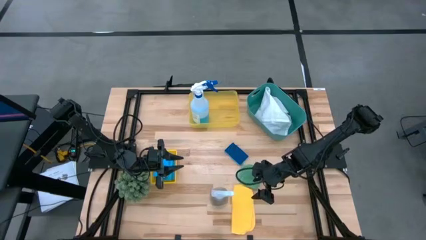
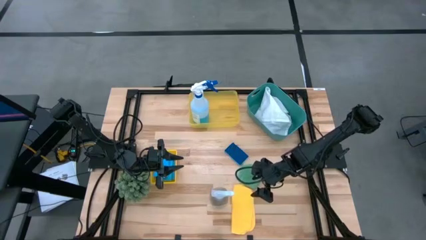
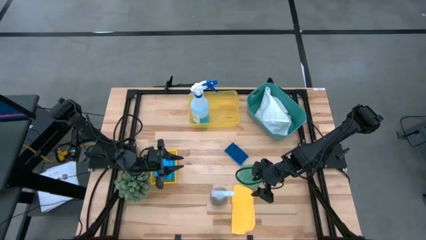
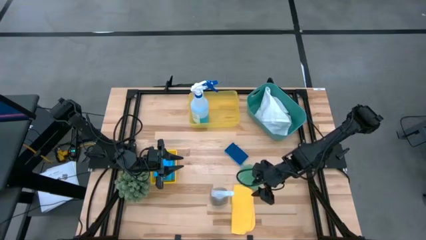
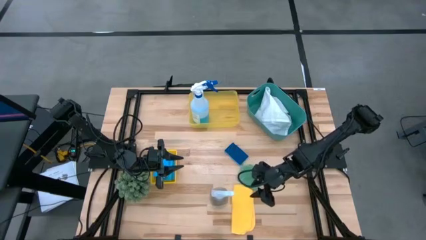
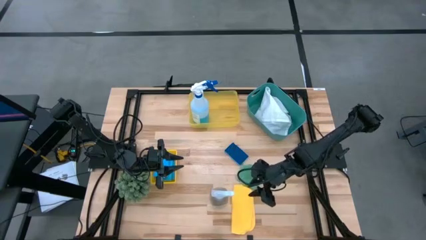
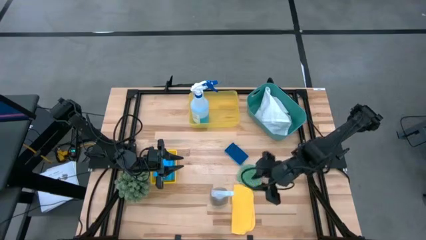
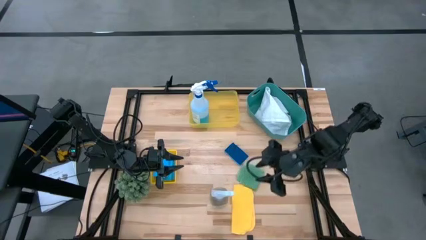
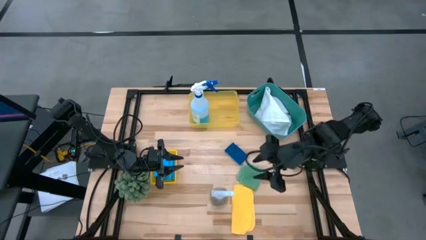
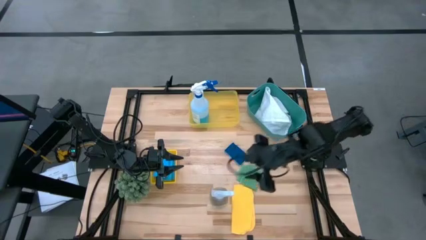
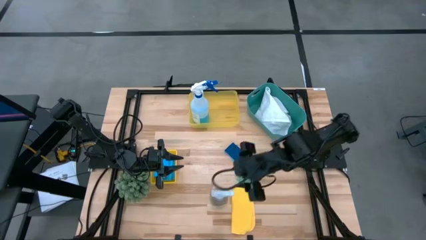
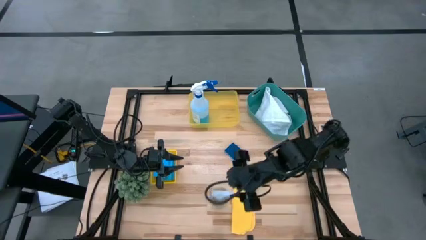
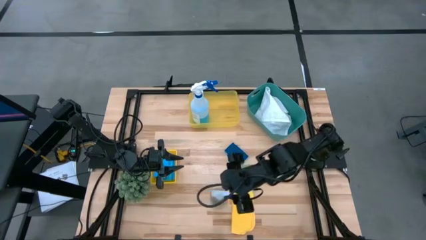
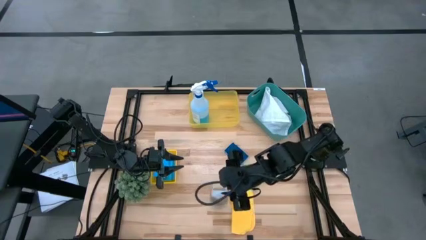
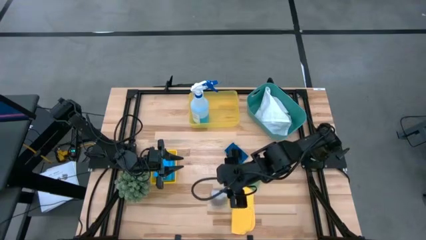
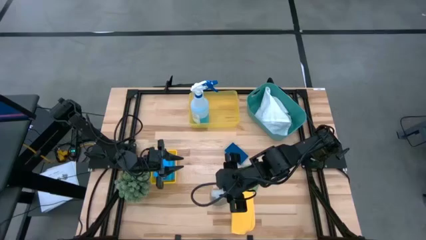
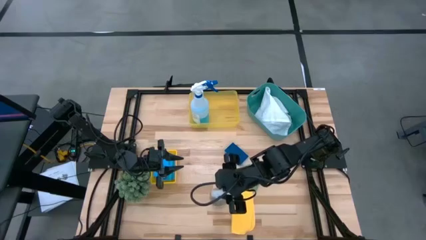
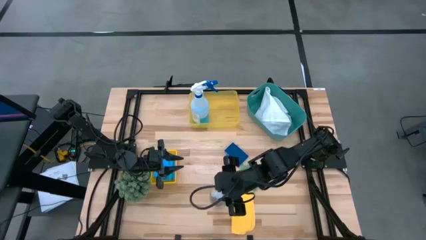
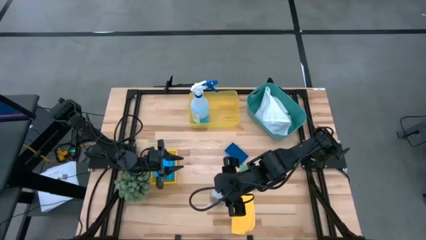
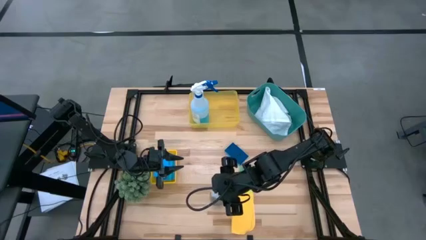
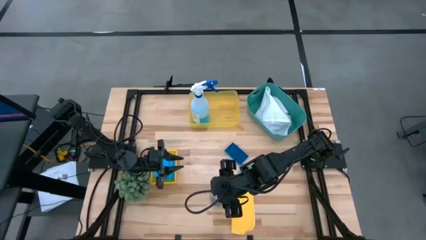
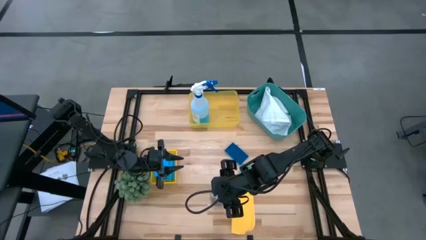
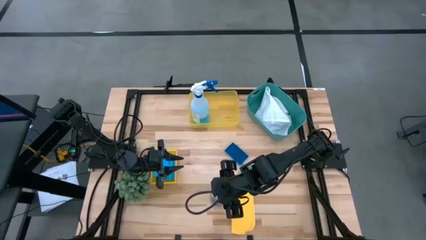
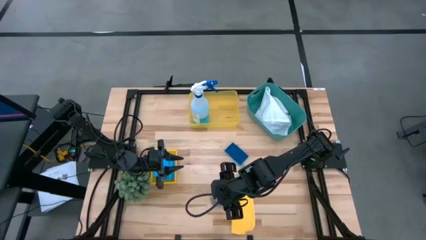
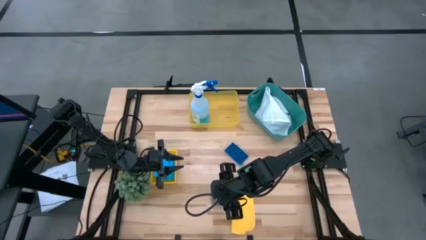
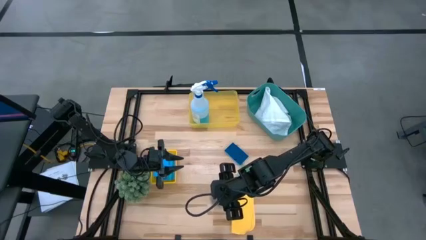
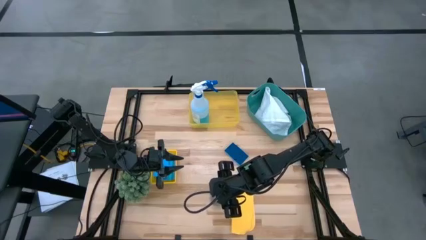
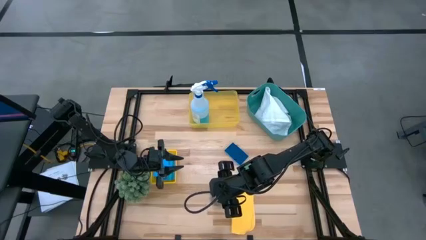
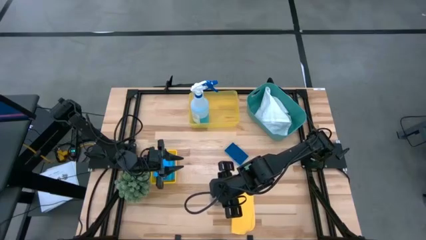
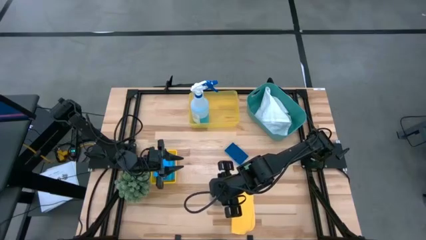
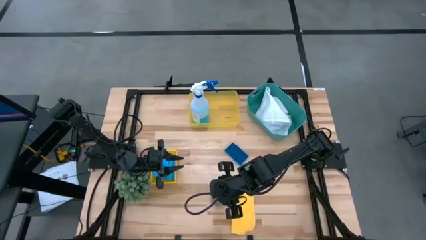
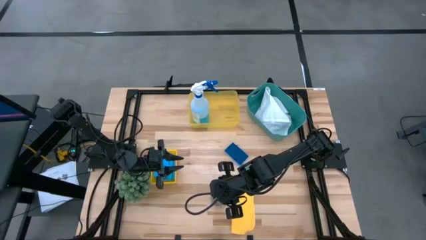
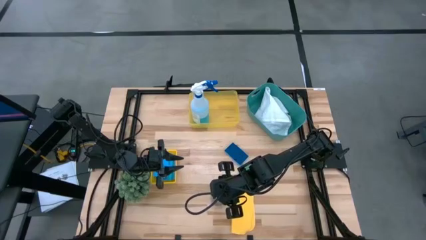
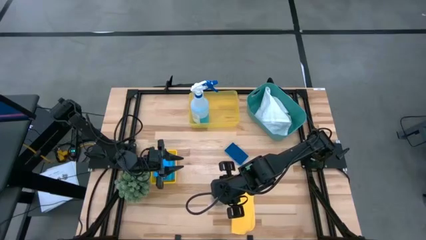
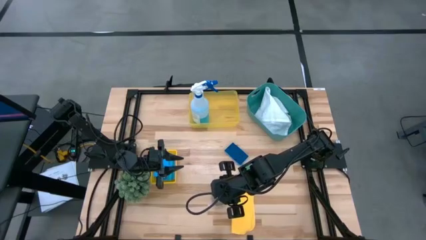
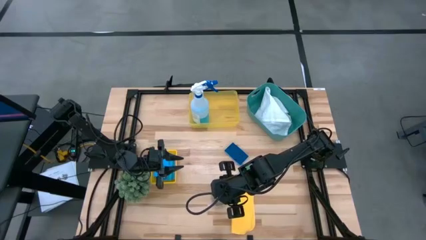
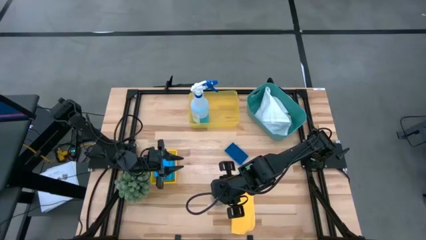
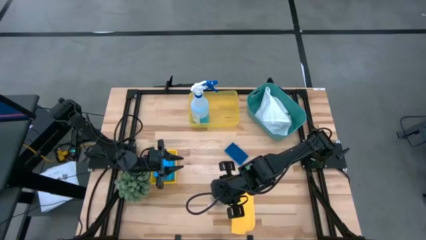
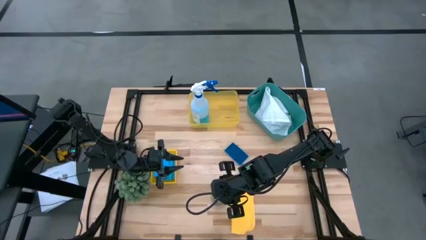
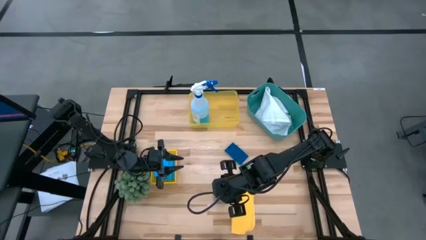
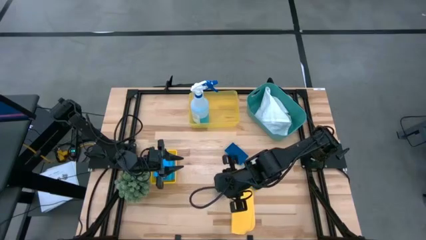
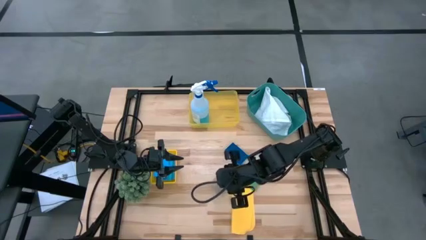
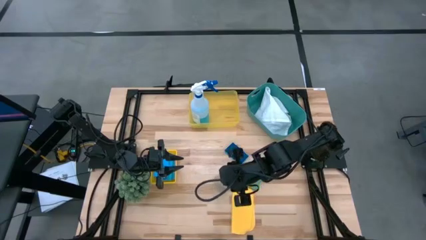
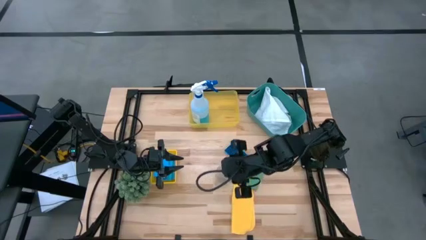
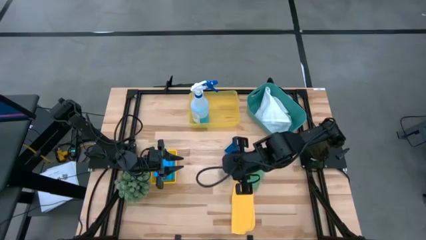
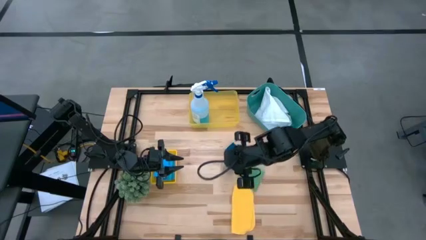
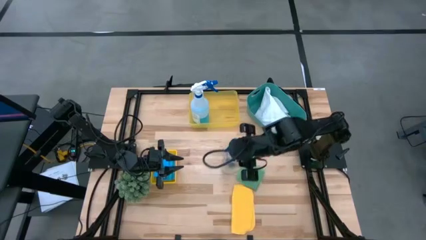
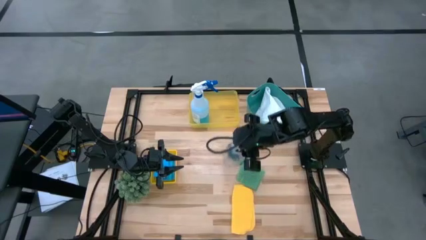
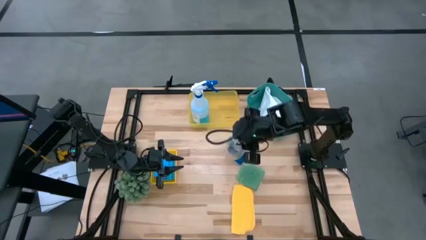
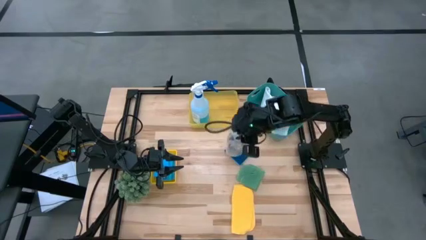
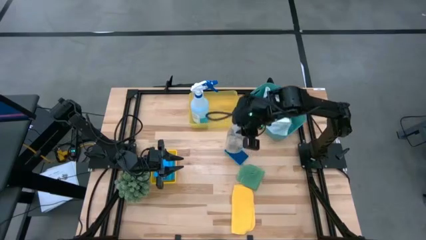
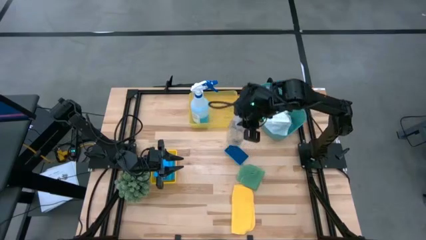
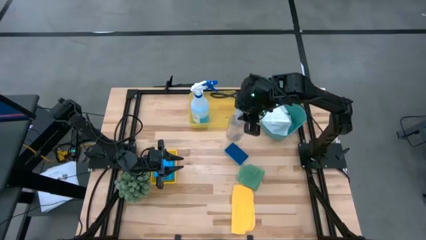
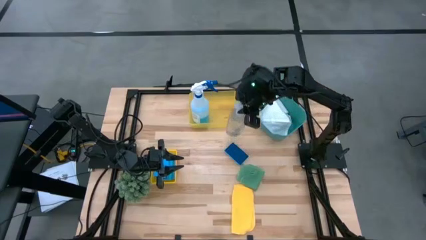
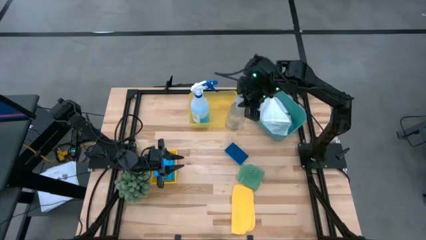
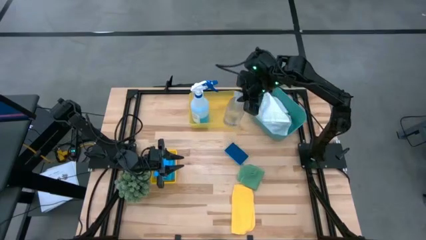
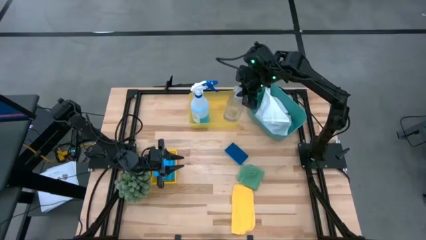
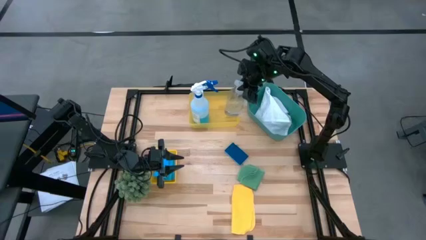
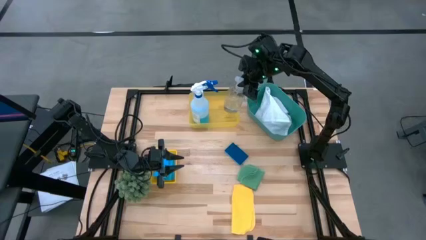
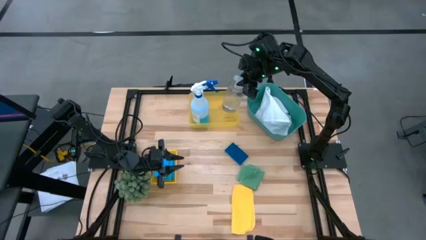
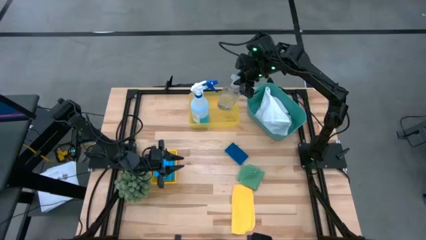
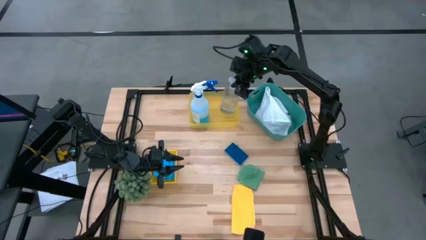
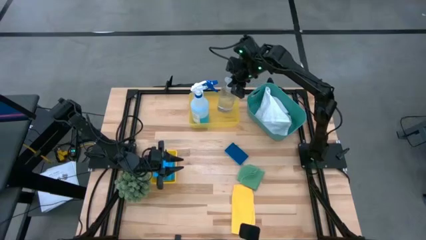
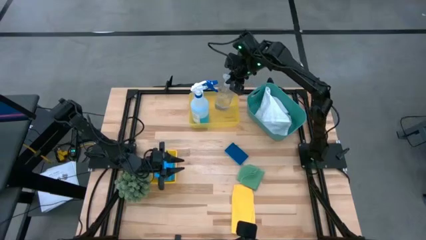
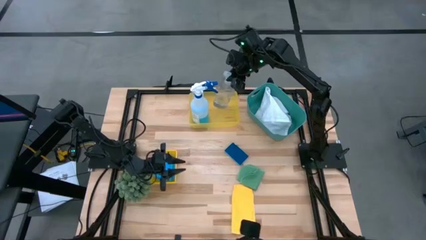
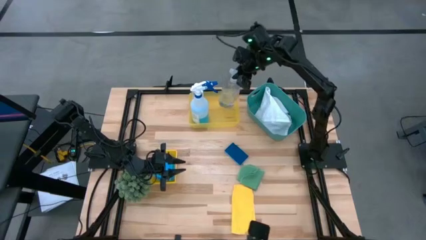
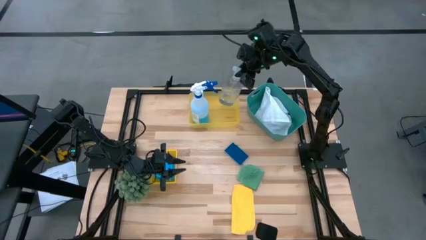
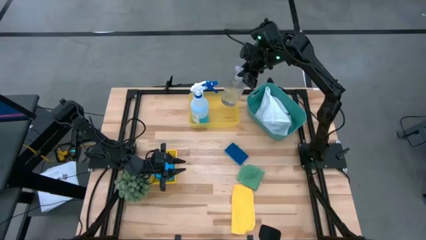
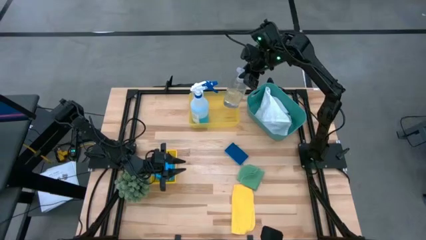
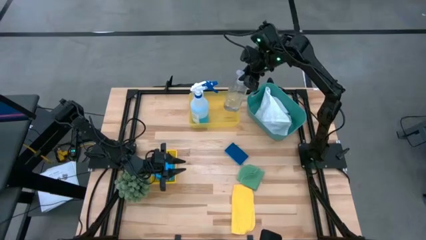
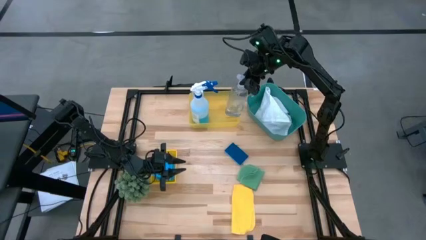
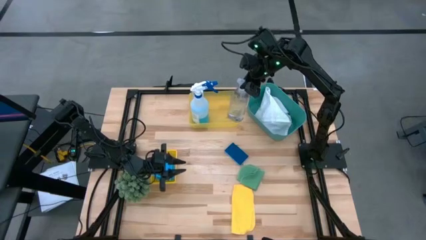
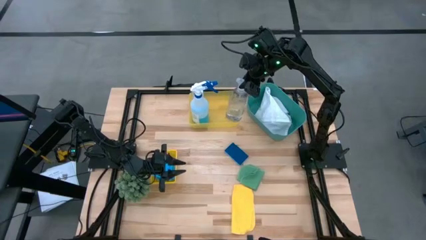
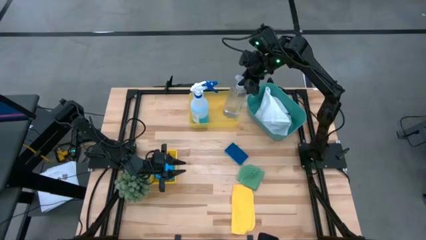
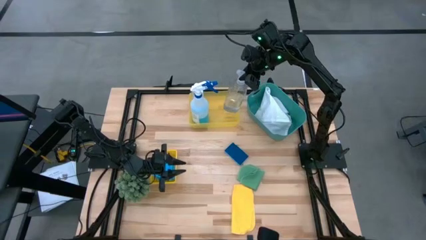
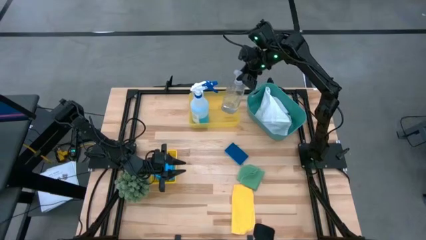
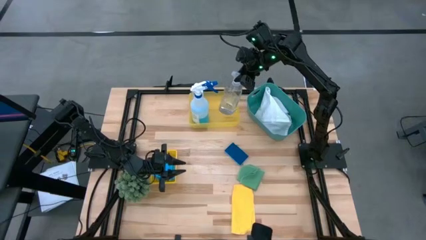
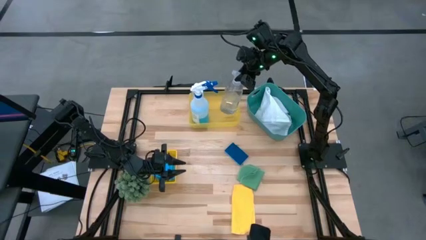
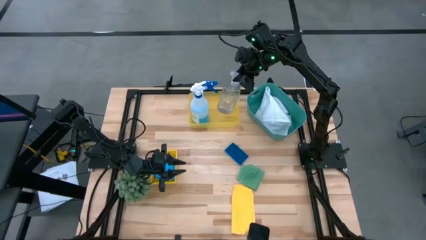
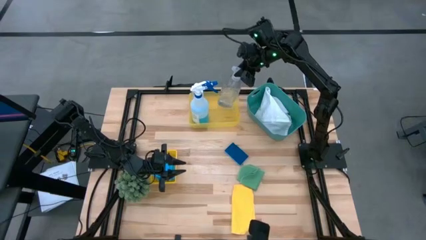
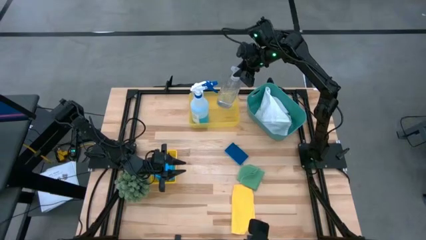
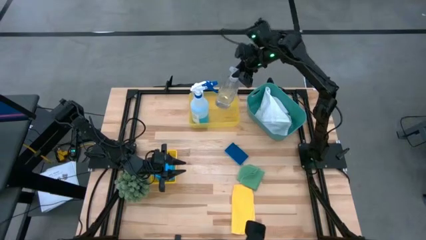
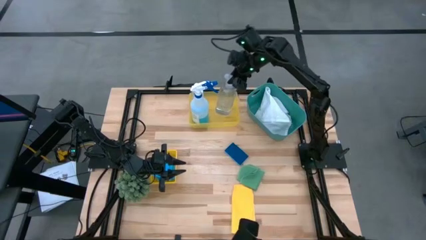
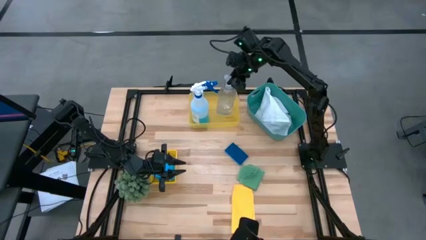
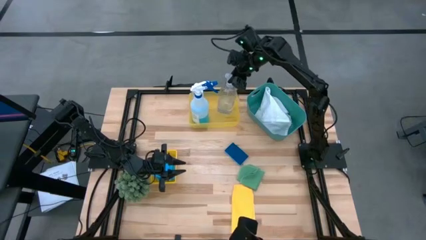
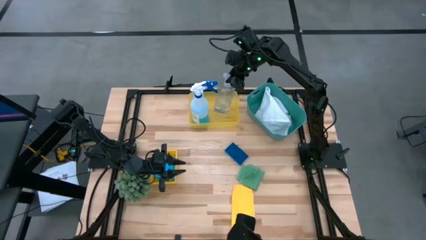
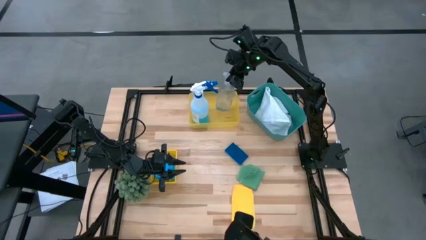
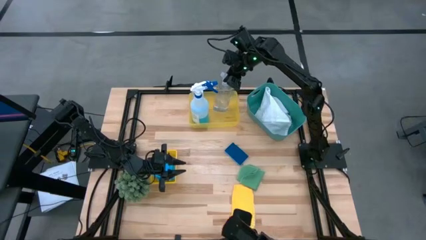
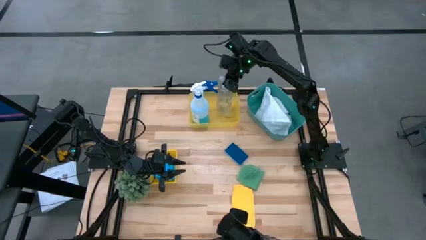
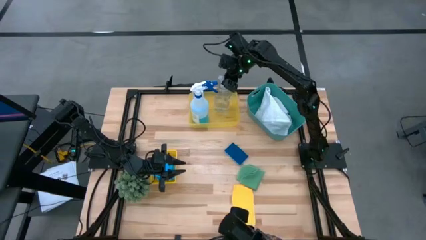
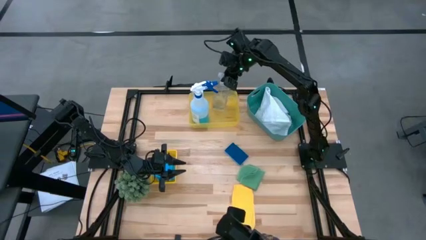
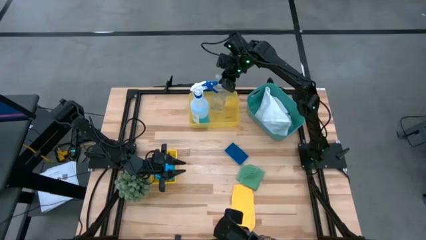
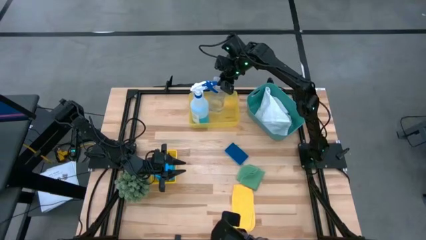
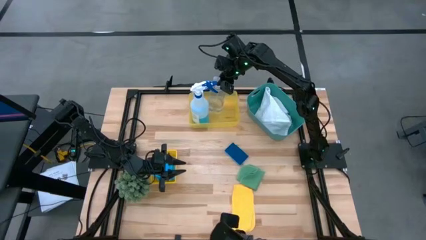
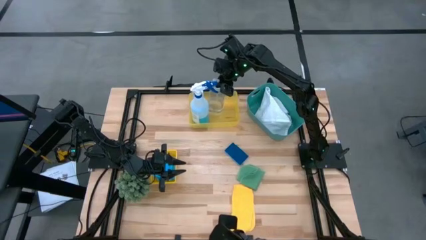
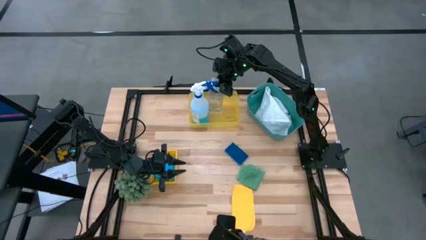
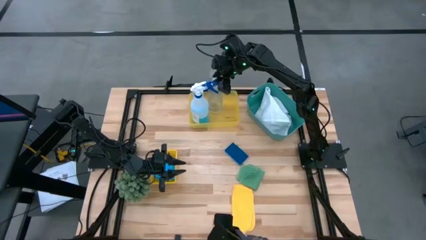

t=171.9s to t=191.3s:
Task: Pick & Place Kitchen Items
Put the transparent spray bottle into the top yellow bin
